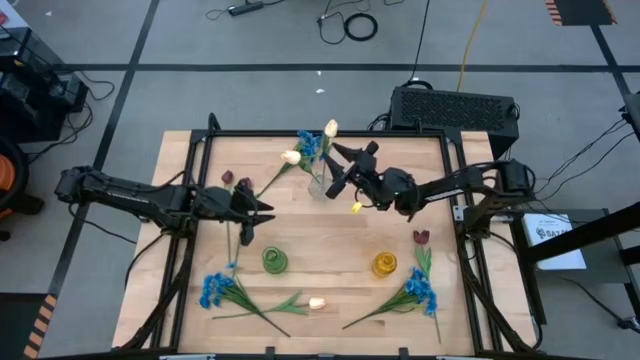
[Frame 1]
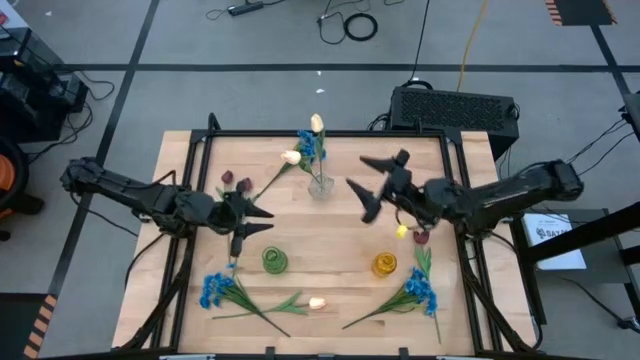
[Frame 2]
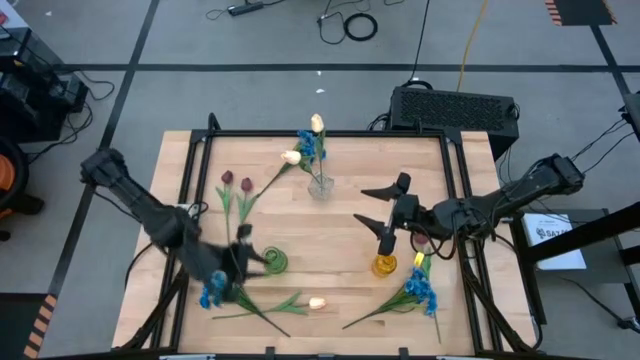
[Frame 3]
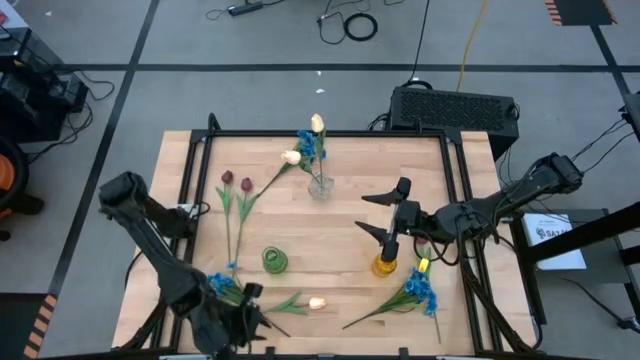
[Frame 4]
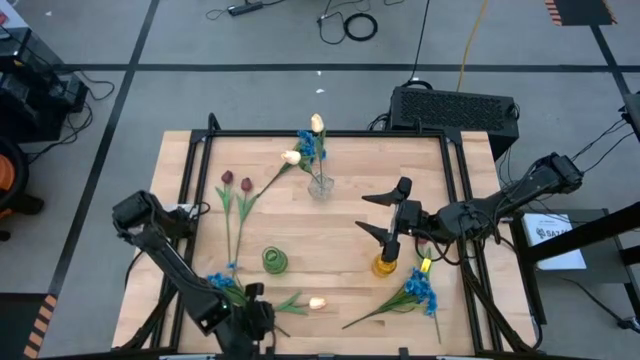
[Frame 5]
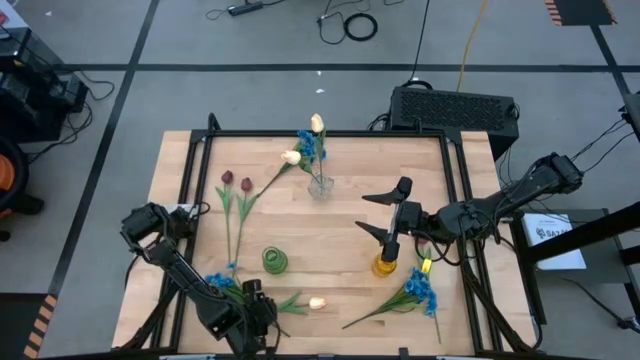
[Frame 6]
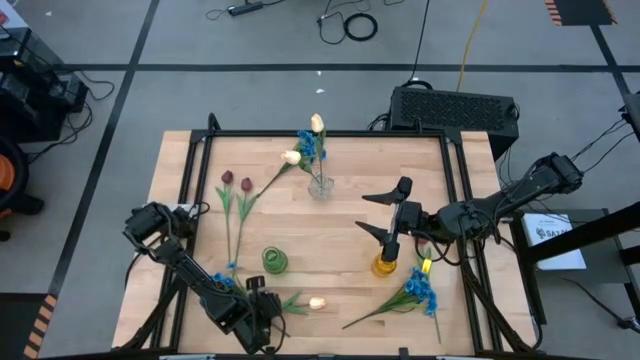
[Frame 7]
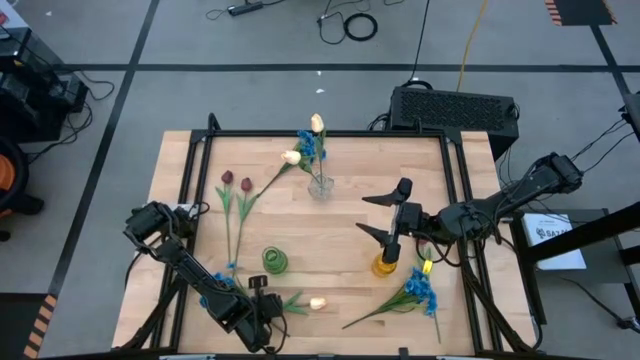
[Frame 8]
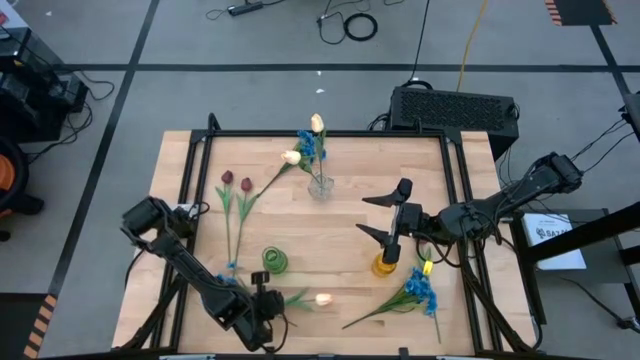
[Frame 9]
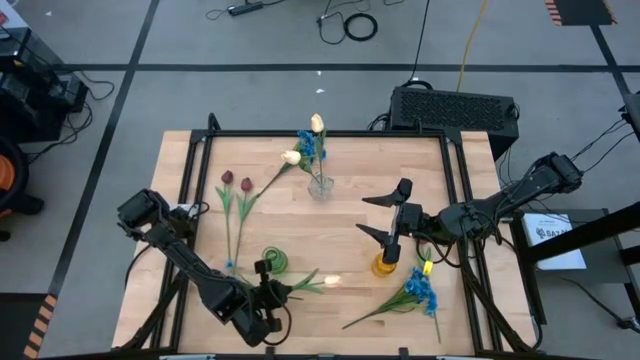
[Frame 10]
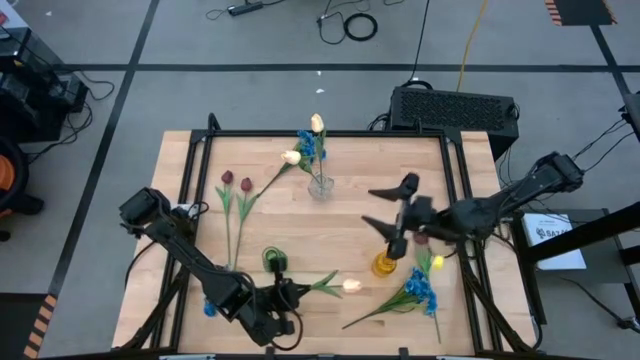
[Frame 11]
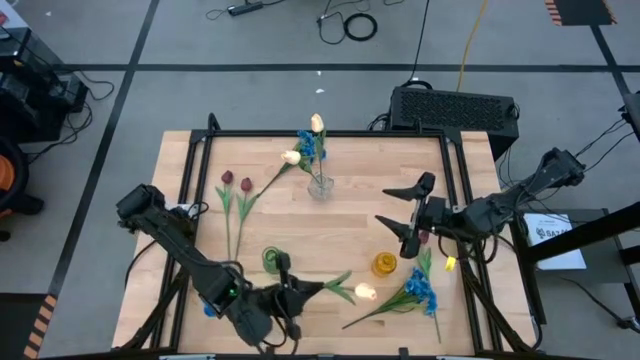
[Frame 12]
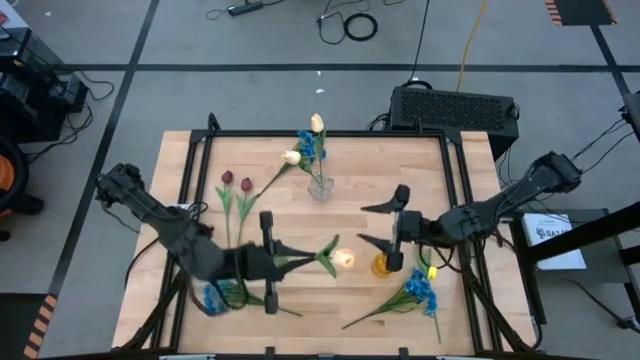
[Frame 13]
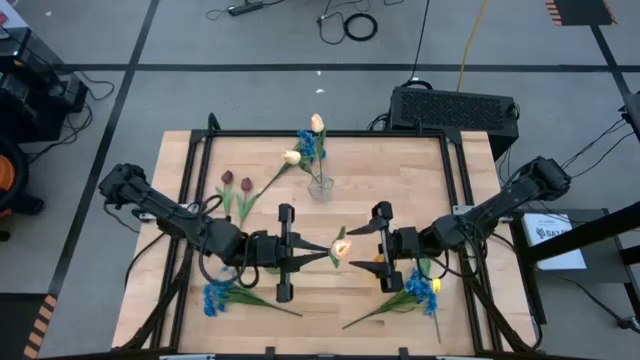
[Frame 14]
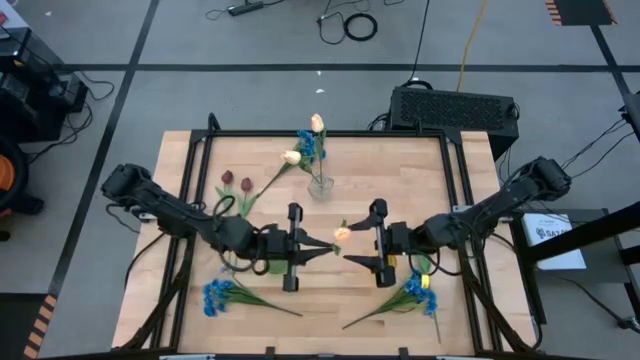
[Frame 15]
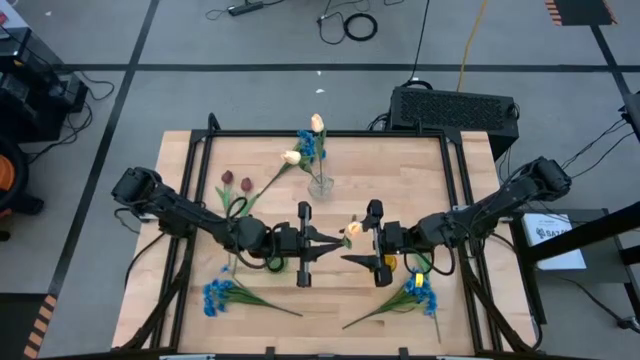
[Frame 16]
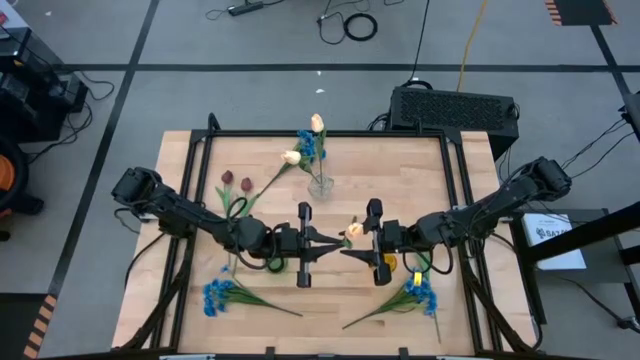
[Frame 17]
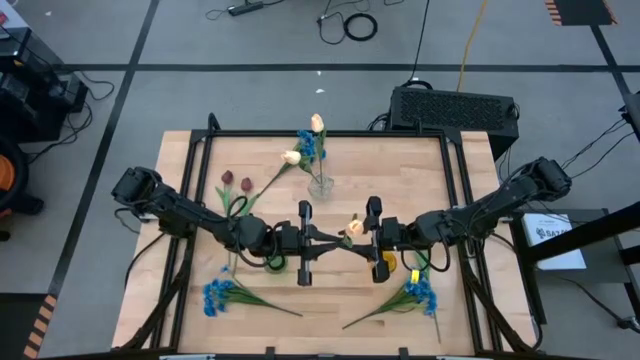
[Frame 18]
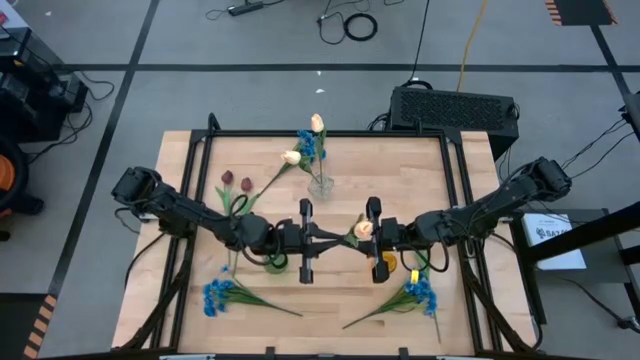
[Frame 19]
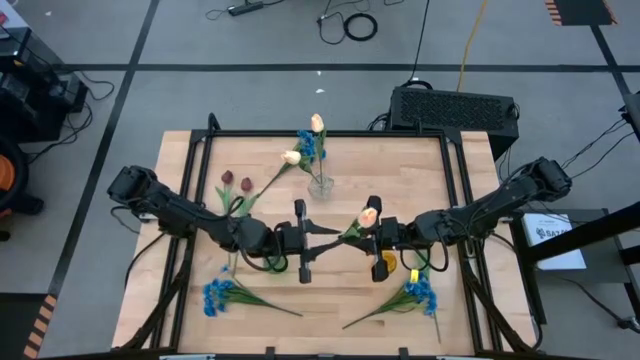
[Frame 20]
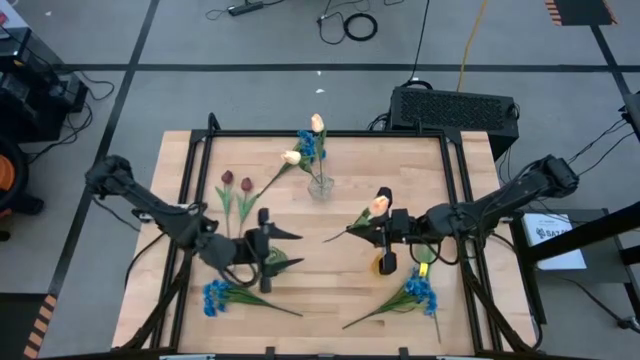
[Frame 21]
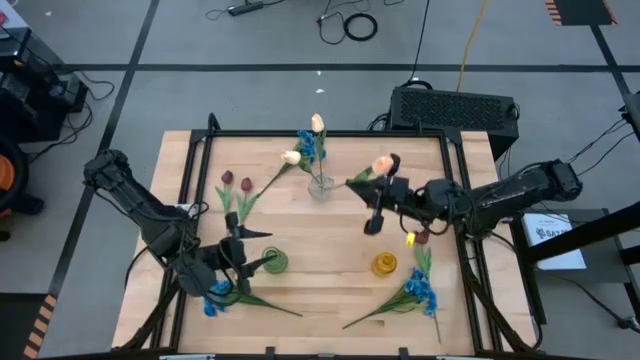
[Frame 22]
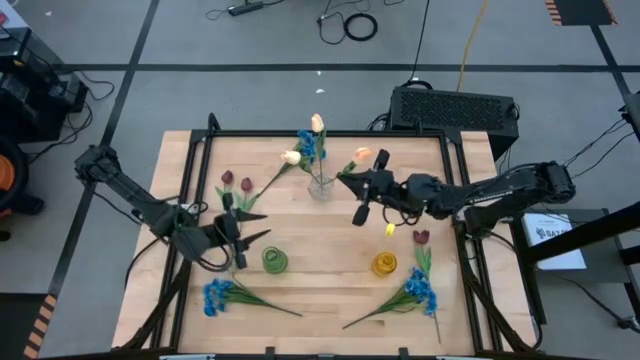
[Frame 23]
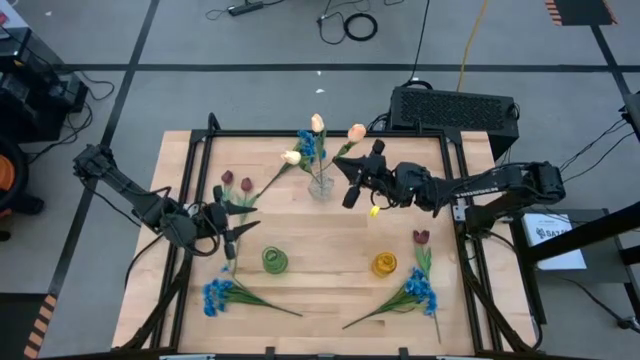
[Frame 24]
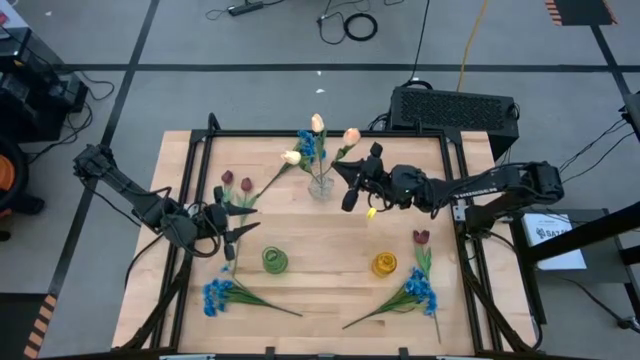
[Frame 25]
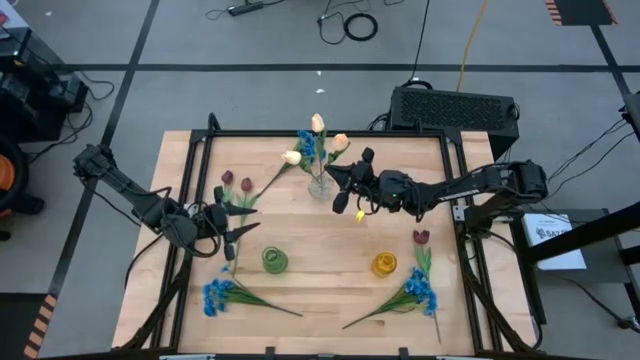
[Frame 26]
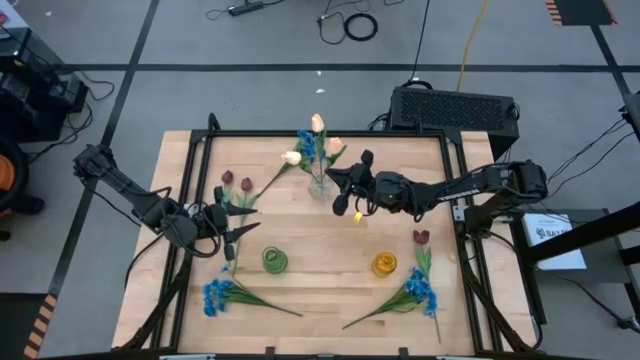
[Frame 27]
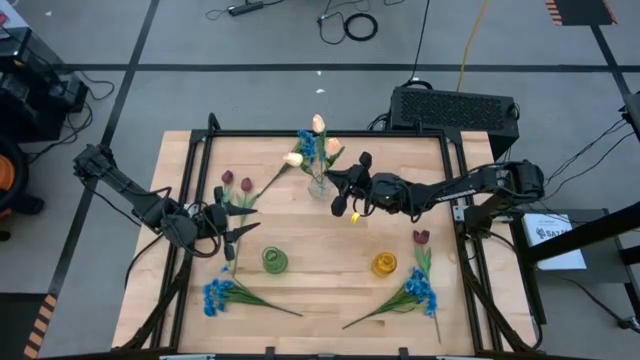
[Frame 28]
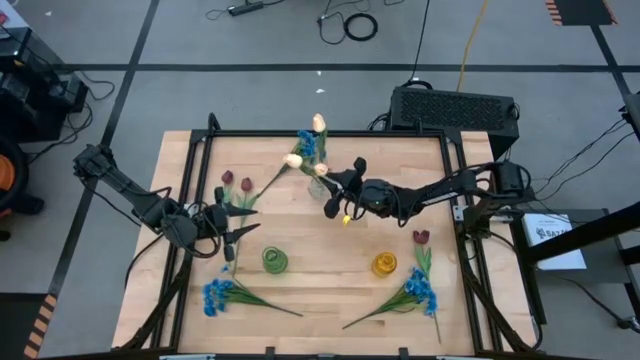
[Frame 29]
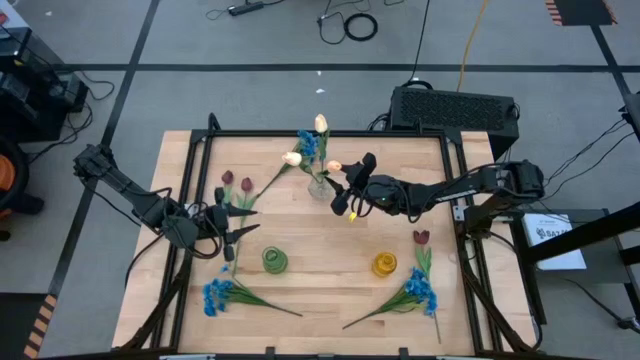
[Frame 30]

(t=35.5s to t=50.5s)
Task: Sort flowers into vase by color
Put the pink flower into the transparent vase

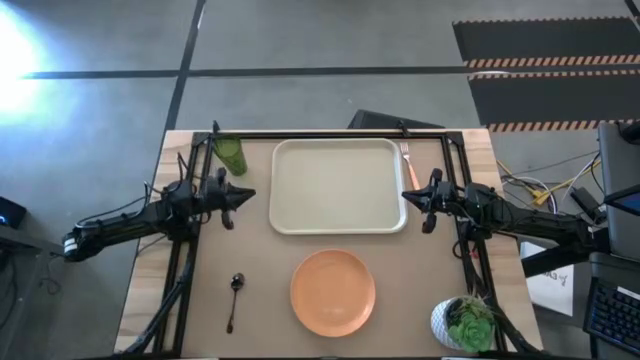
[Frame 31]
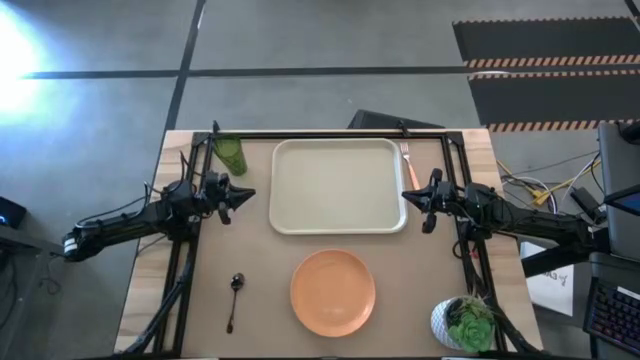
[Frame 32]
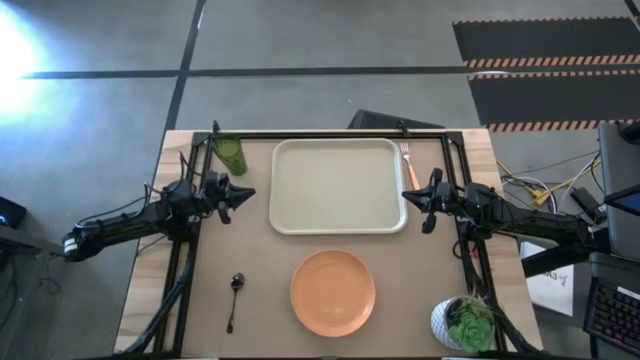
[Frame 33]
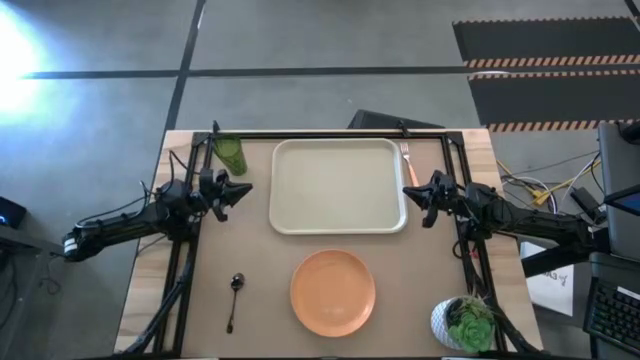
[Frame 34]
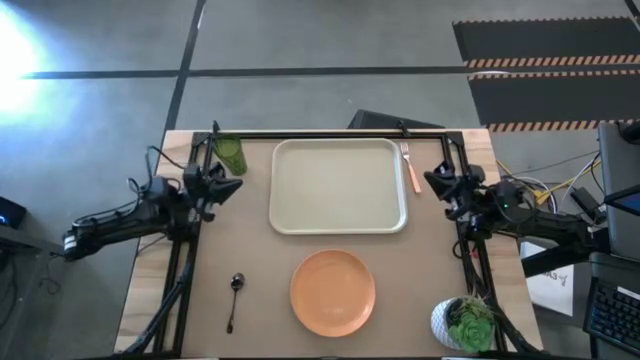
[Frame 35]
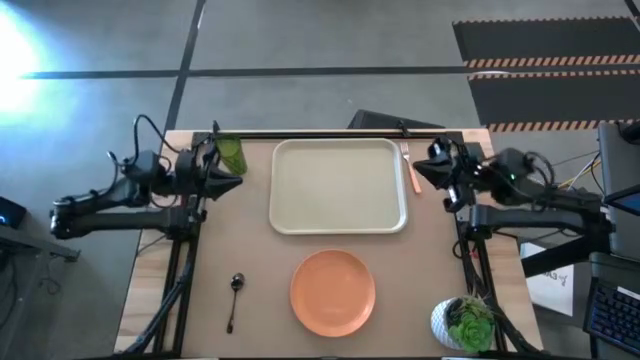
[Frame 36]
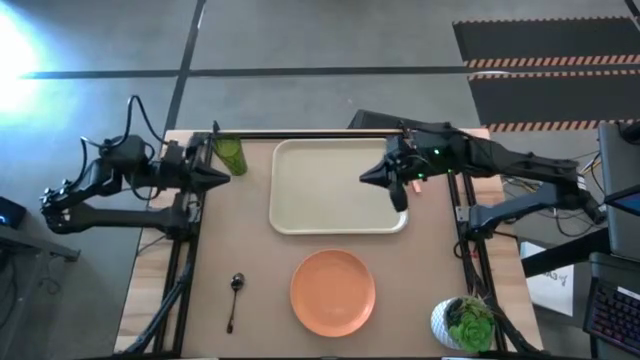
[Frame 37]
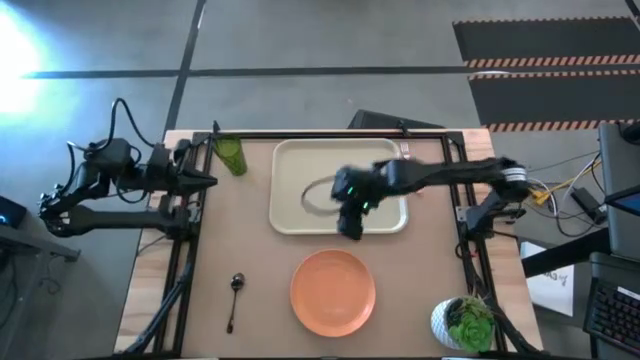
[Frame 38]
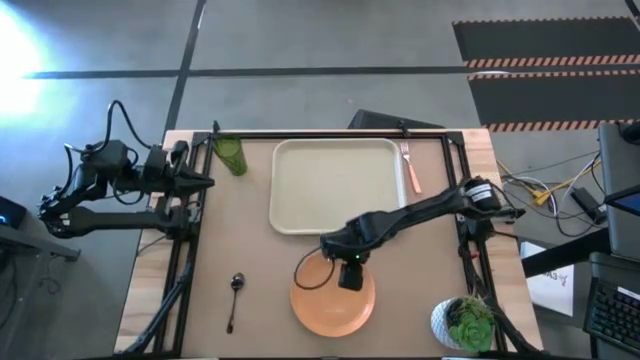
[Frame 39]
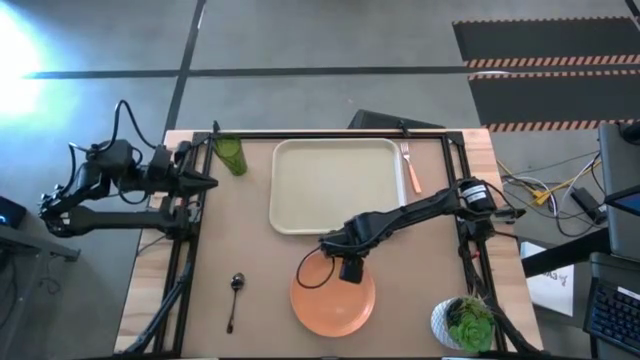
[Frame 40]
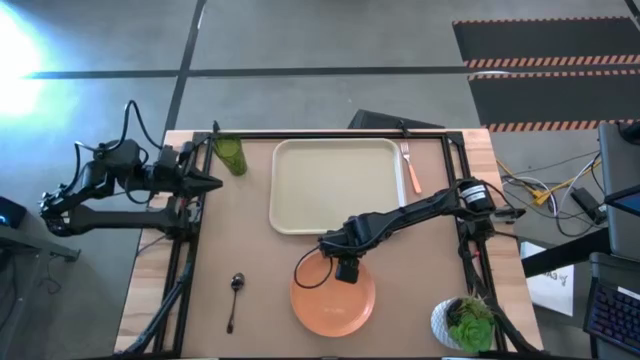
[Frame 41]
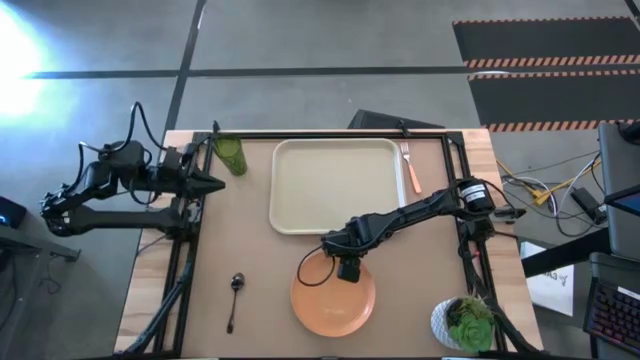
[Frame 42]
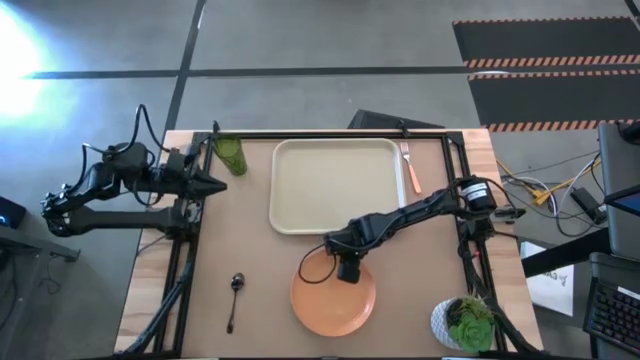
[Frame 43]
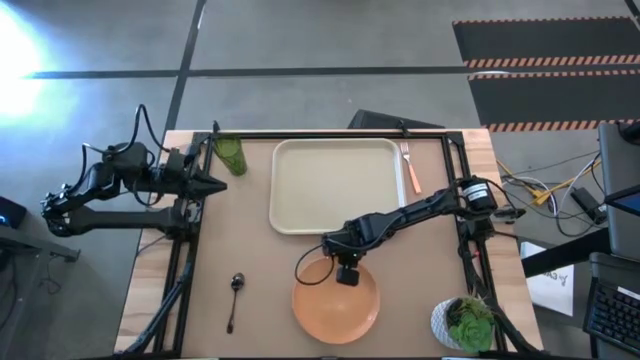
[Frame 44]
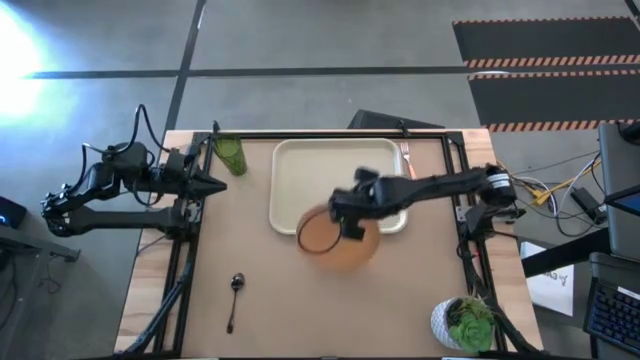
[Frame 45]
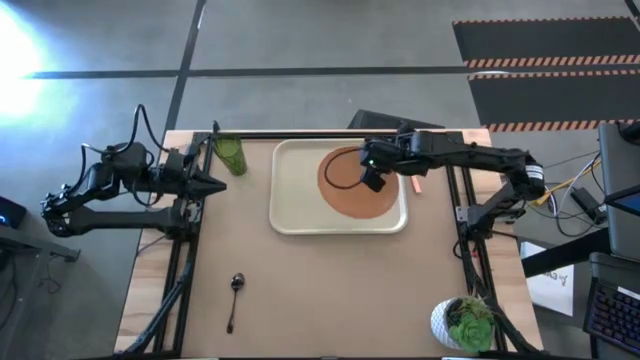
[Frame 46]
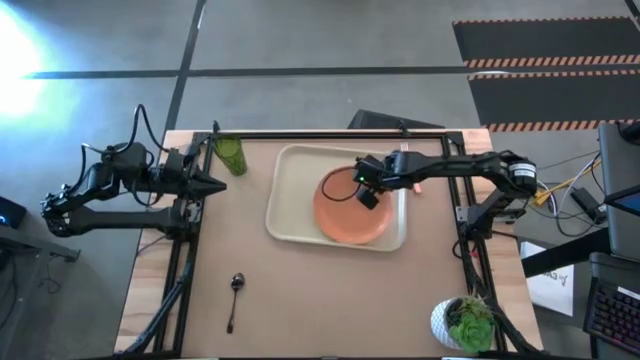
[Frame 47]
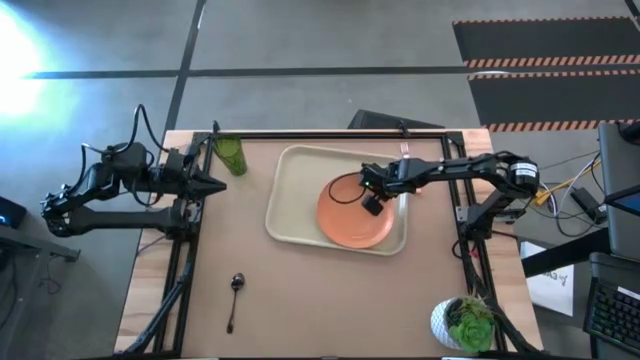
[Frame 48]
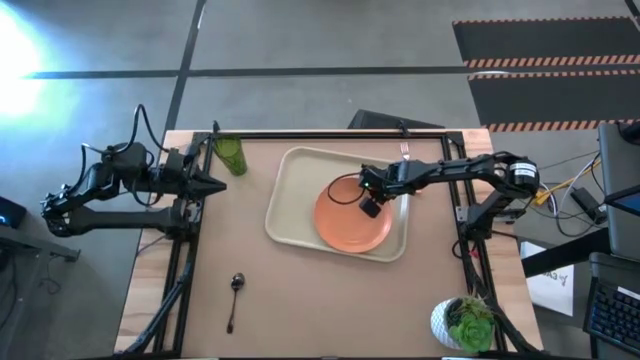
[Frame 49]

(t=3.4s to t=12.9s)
Task: Pick and place plate/cup/fork/spoon on tray
Put the orange plate on the light brown serving tray
